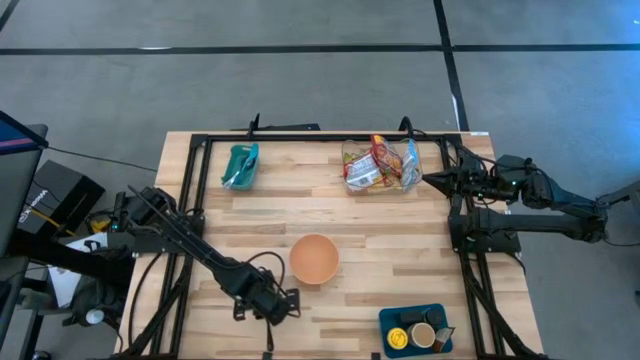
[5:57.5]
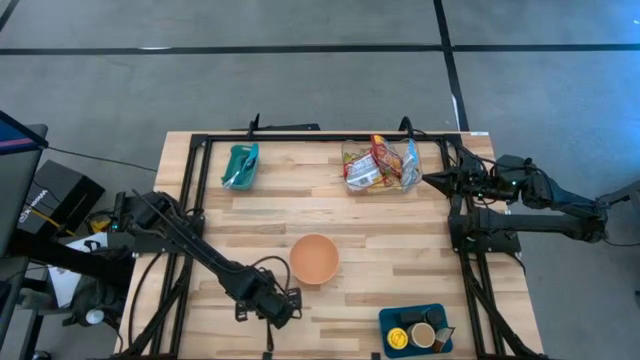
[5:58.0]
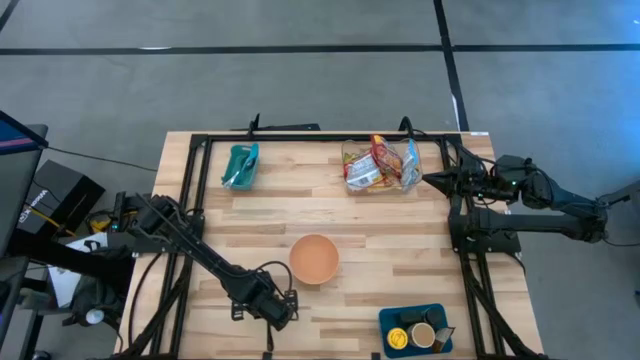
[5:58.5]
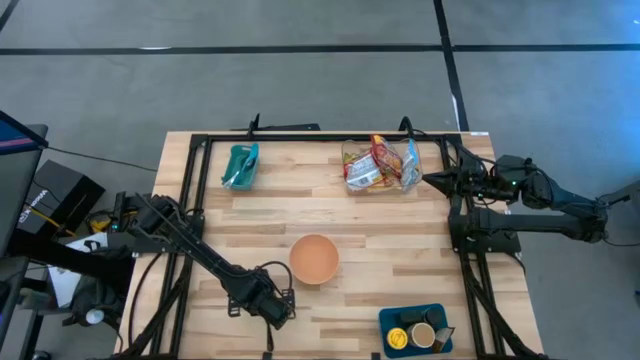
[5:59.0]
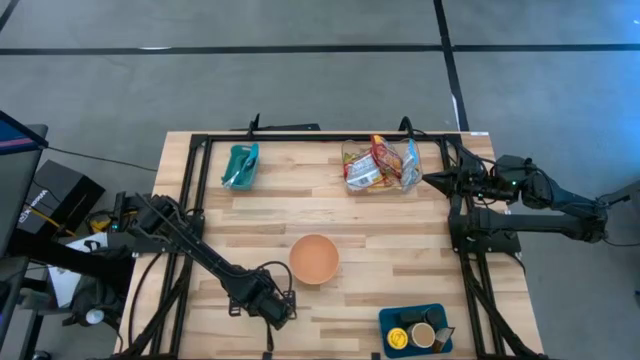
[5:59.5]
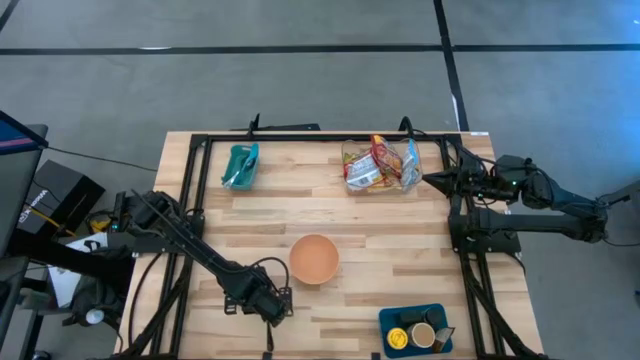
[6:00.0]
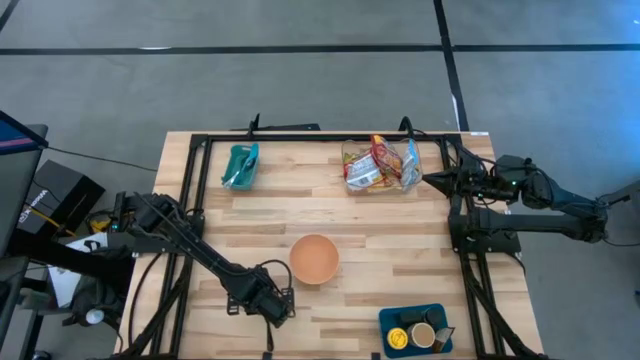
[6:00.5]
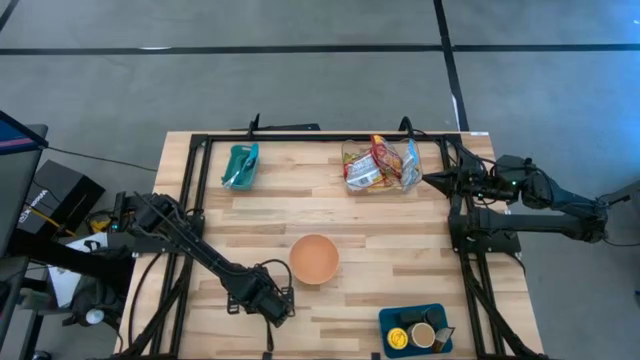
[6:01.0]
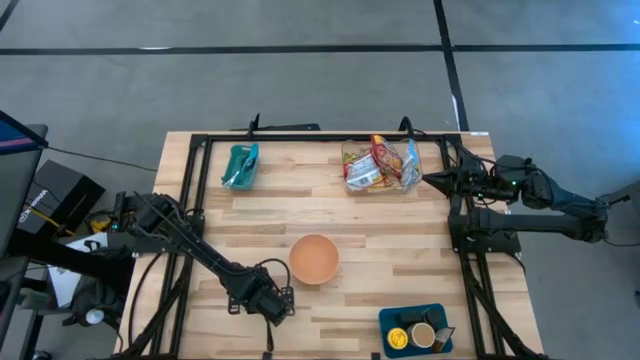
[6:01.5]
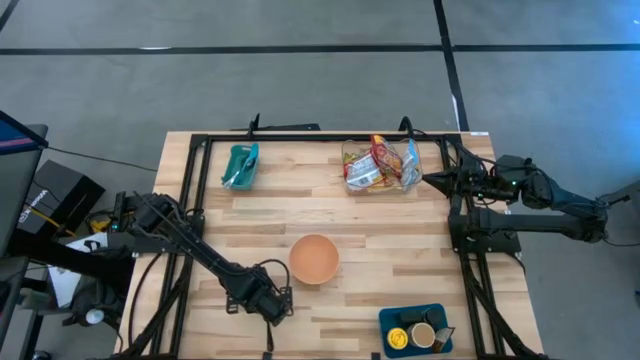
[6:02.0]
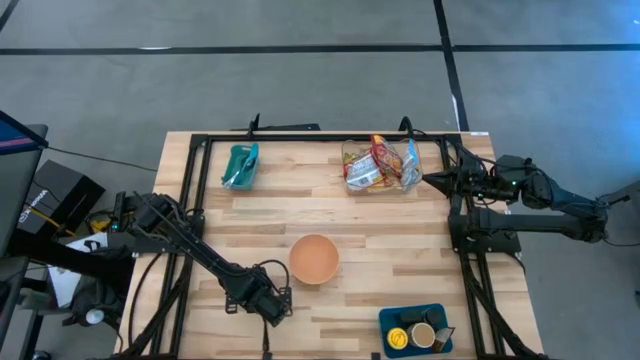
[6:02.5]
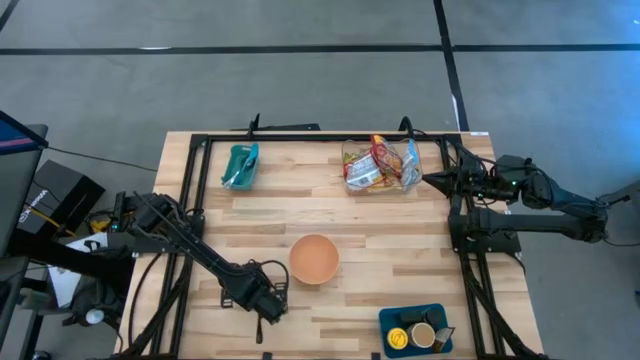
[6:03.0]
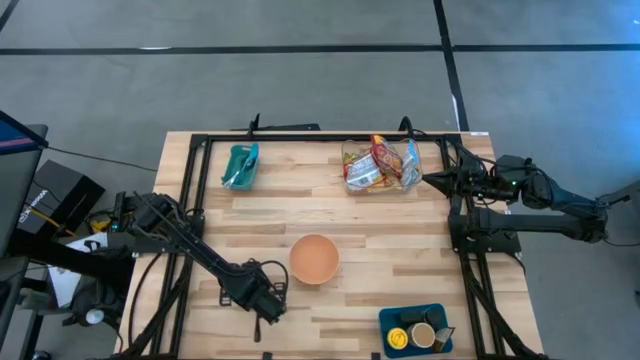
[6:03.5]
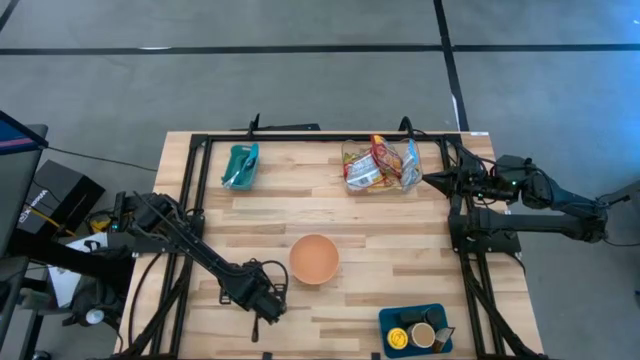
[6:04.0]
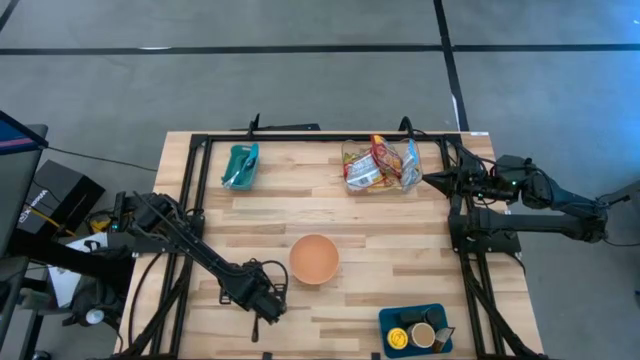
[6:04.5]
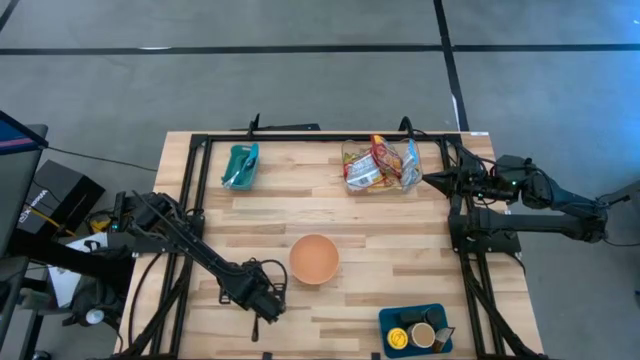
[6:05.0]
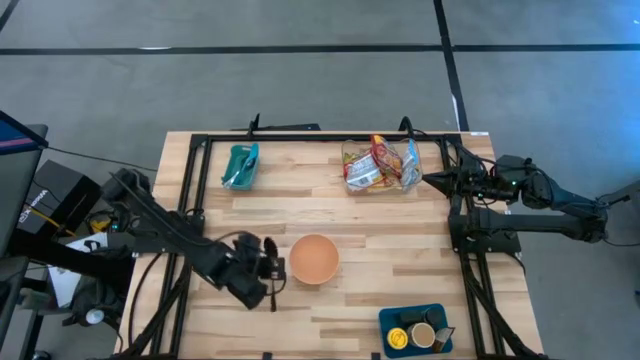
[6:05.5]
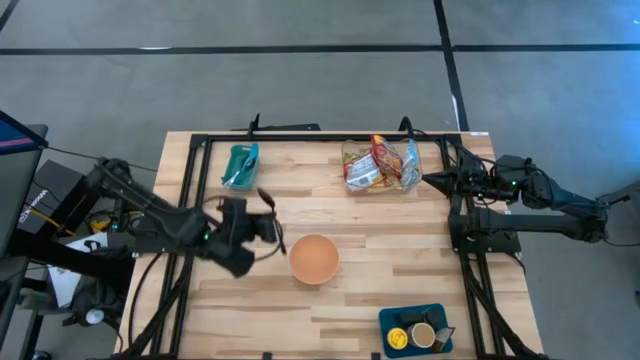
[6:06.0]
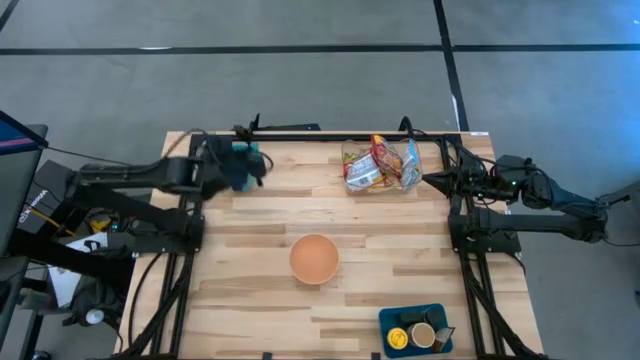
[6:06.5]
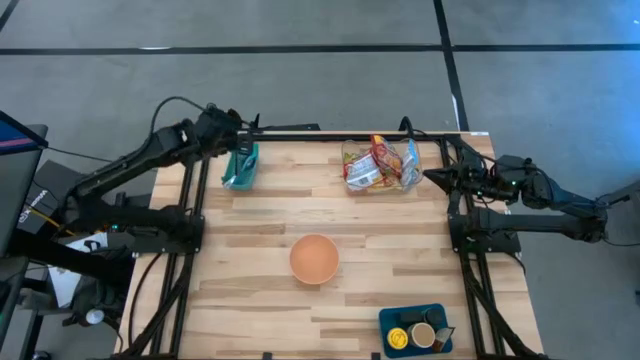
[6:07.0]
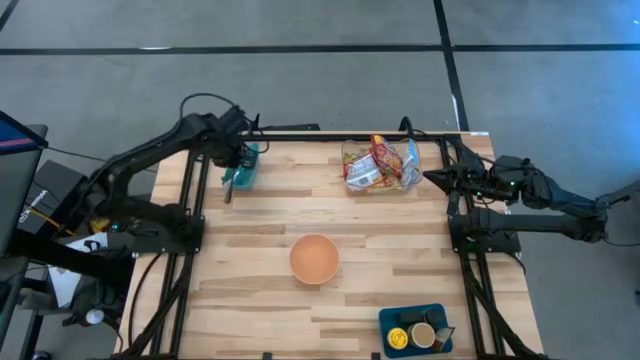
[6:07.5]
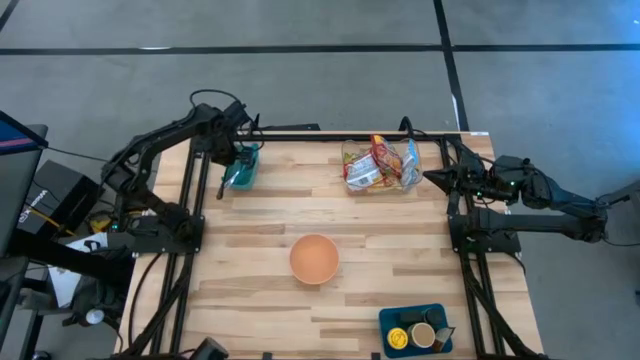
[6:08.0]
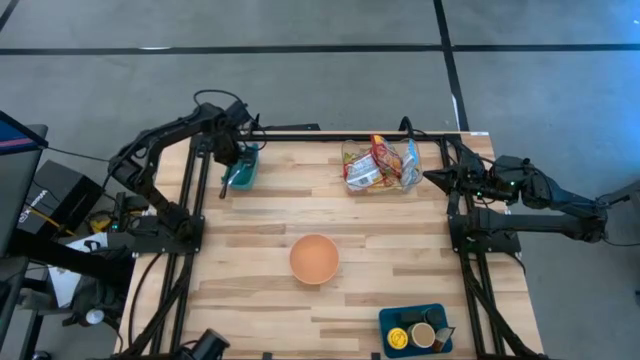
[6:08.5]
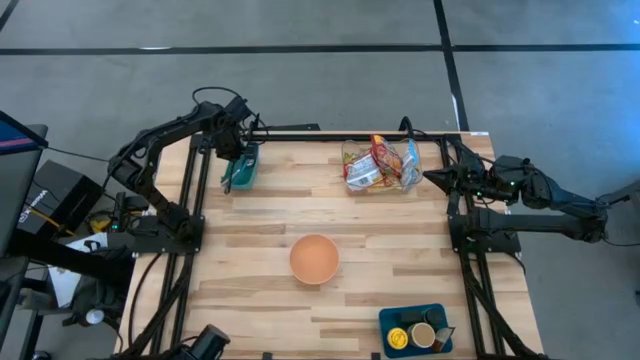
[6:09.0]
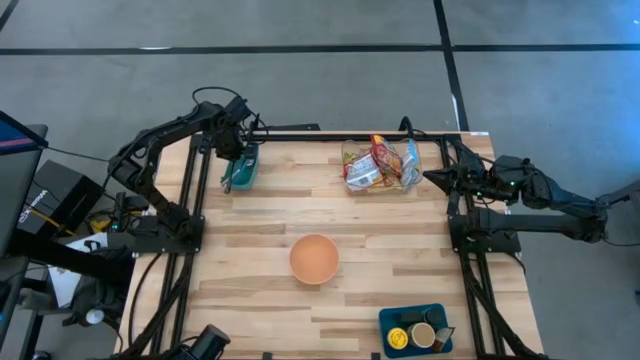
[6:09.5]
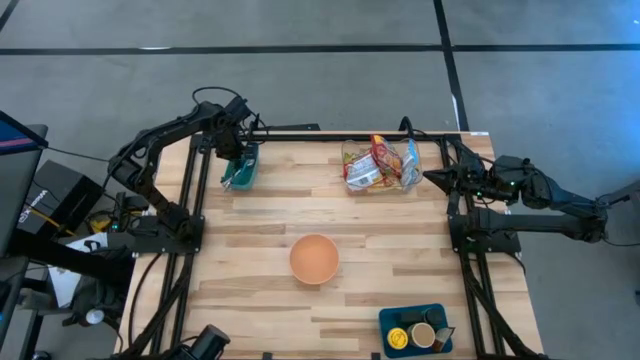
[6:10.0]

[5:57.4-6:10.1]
Task: Pick & Place Food Item
Put the black spoon into the light green bin

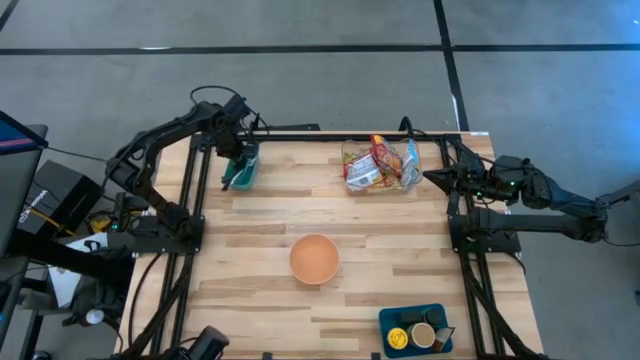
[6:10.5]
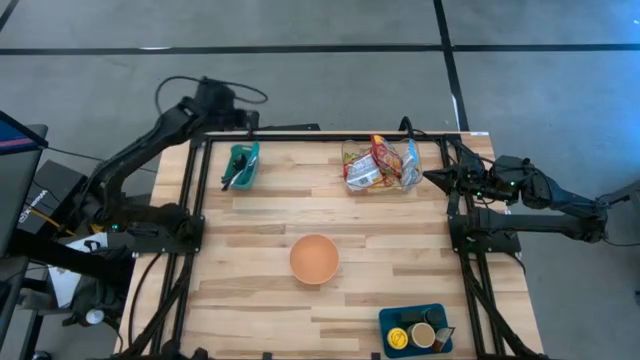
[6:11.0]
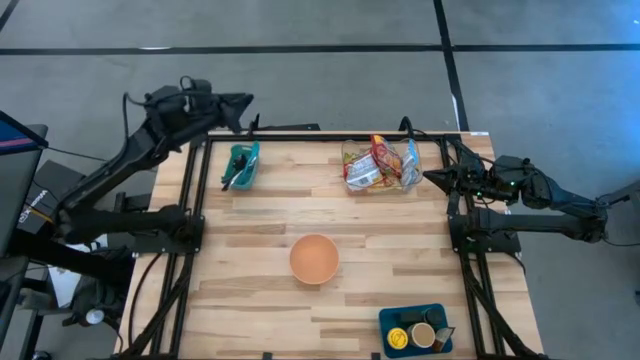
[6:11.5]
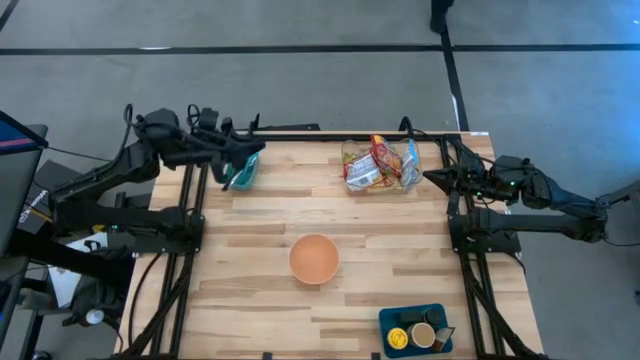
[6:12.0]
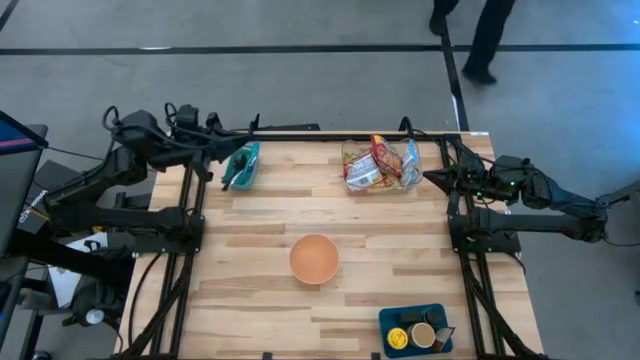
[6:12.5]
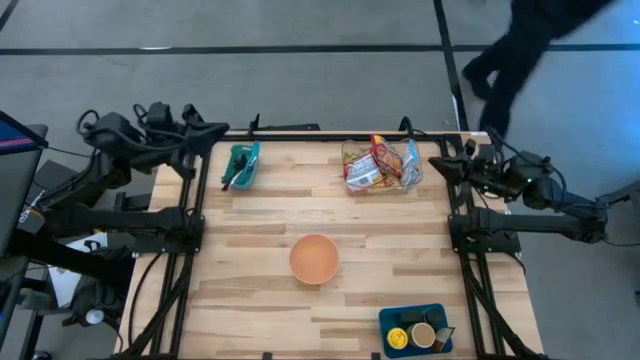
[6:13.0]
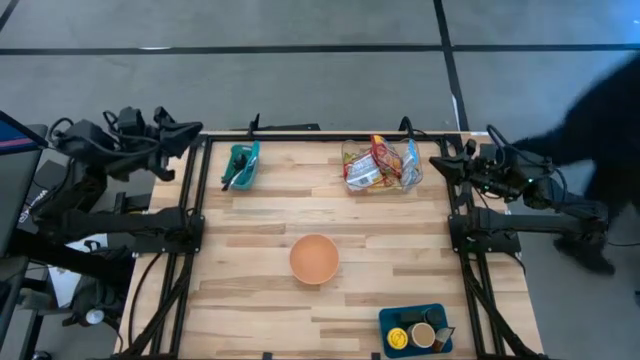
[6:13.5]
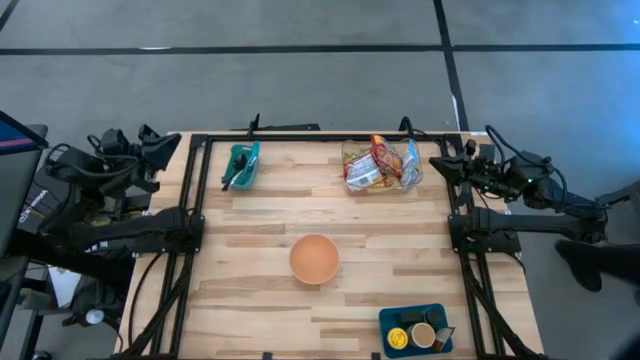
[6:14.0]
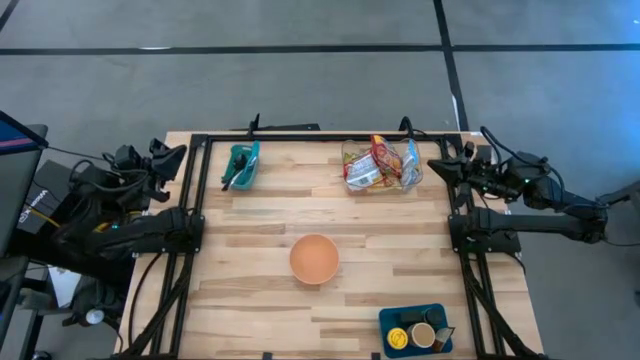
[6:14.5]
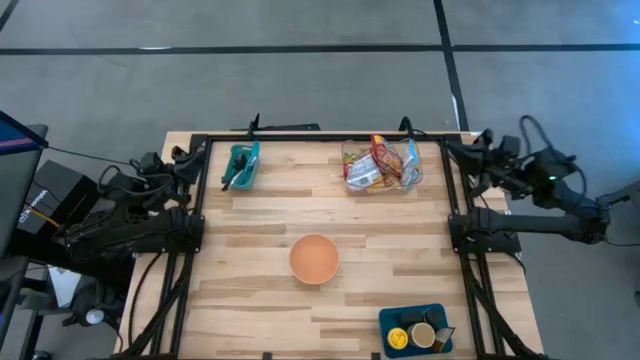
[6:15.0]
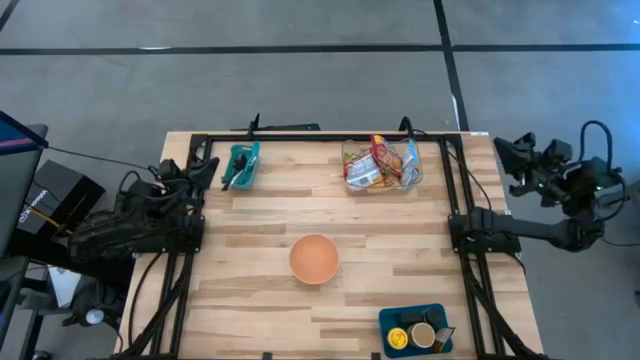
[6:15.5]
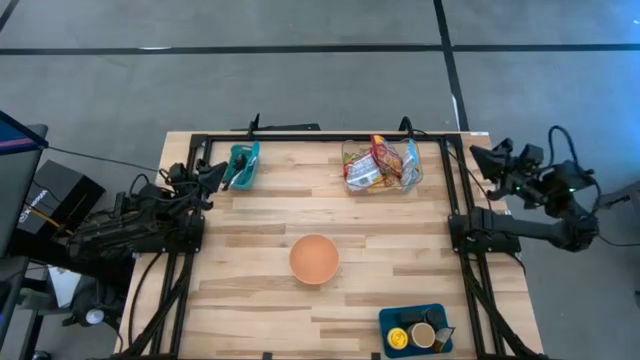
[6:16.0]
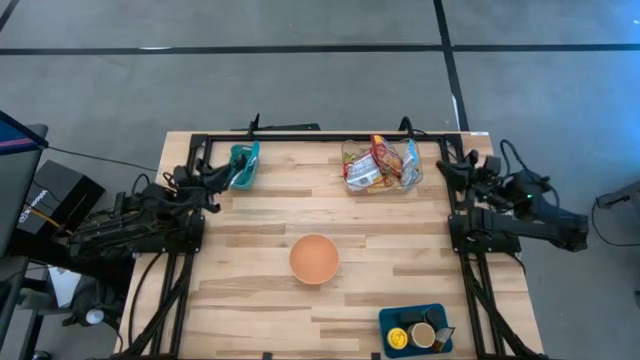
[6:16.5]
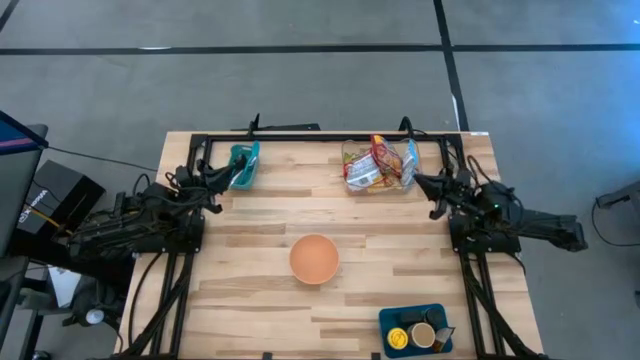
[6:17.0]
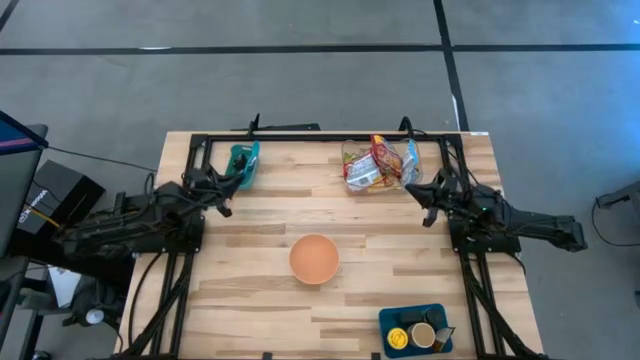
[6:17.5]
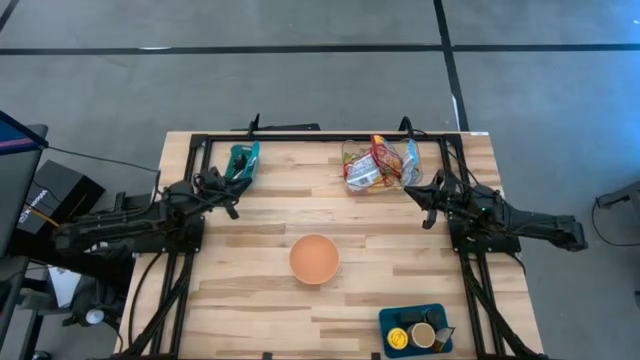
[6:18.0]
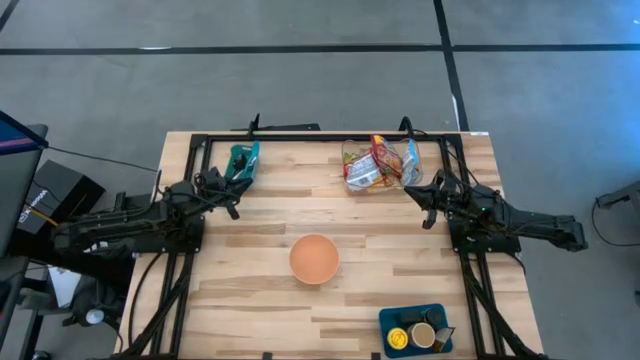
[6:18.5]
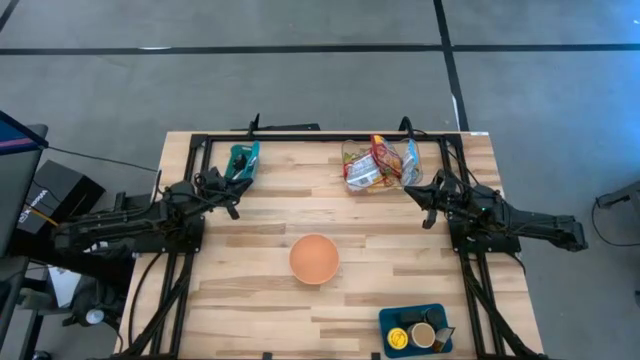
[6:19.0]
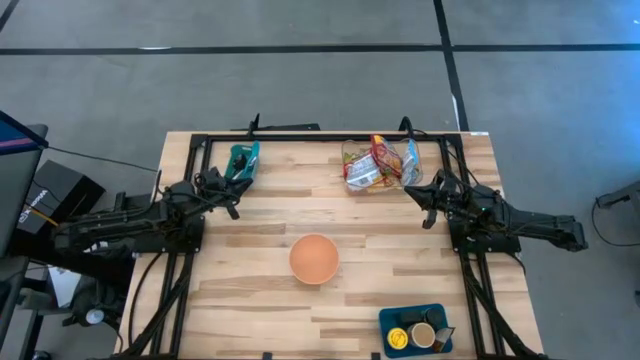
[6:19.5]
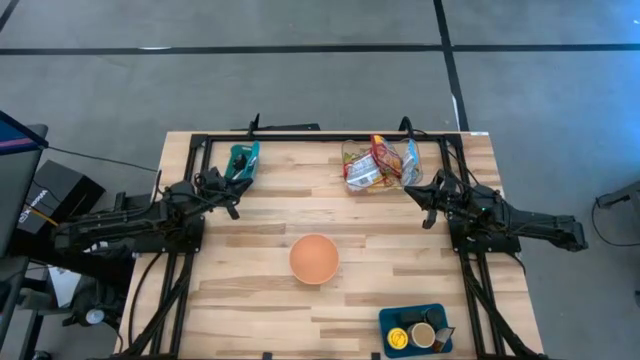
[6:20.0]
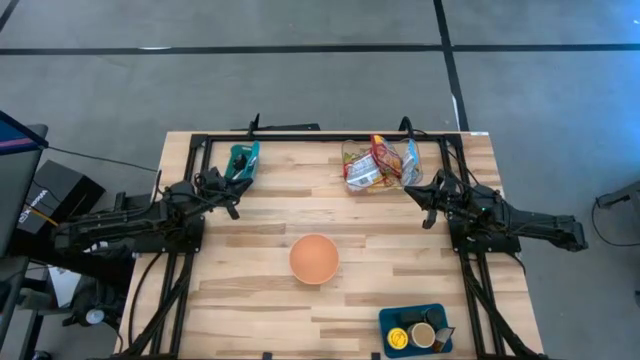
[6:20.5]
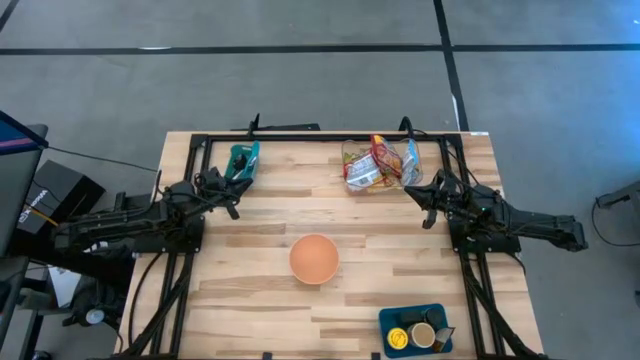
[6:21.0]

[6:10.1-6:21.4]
Return to Home Position
